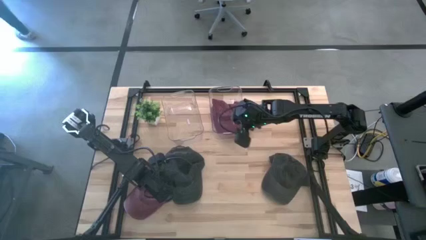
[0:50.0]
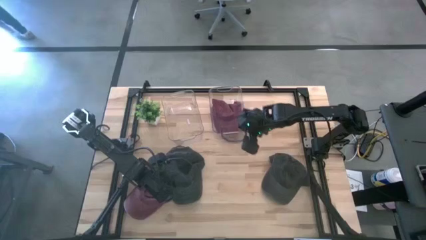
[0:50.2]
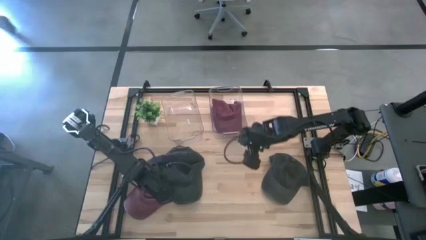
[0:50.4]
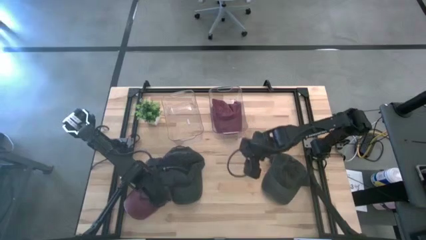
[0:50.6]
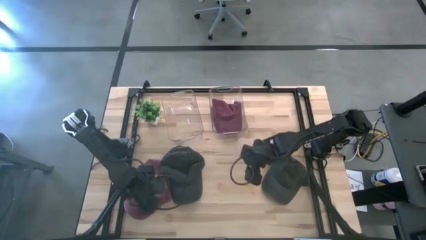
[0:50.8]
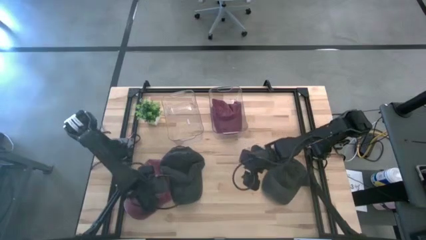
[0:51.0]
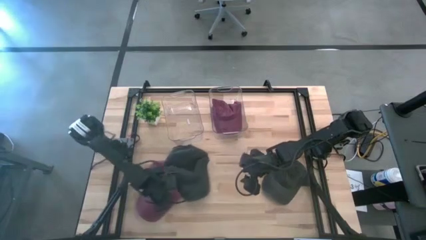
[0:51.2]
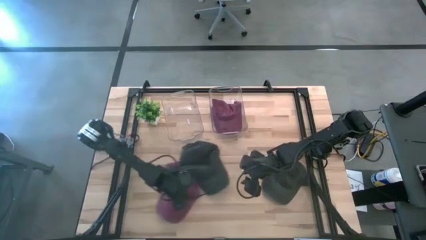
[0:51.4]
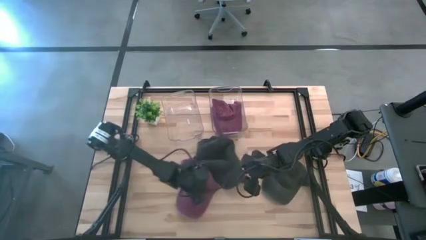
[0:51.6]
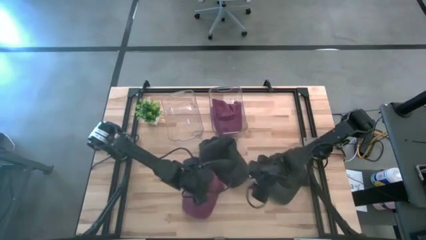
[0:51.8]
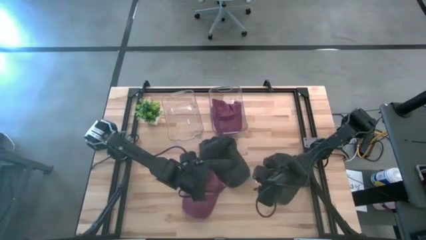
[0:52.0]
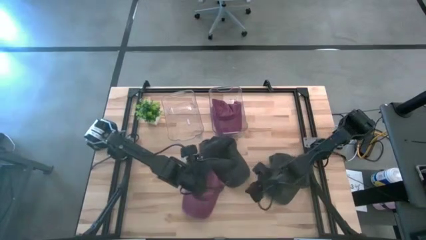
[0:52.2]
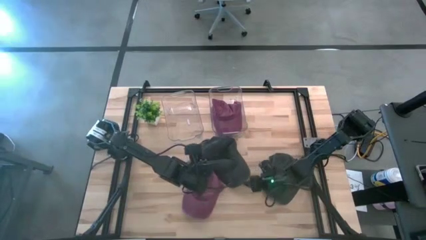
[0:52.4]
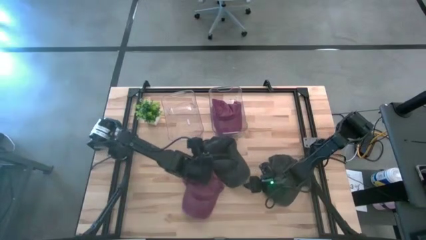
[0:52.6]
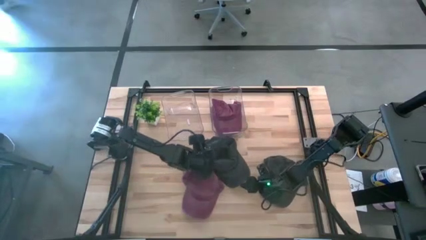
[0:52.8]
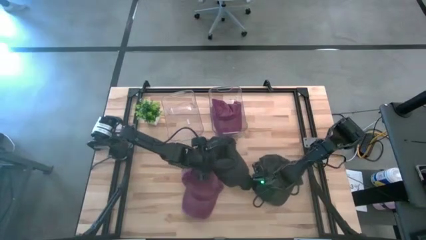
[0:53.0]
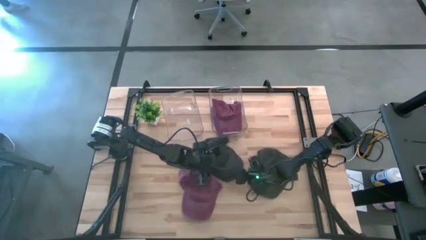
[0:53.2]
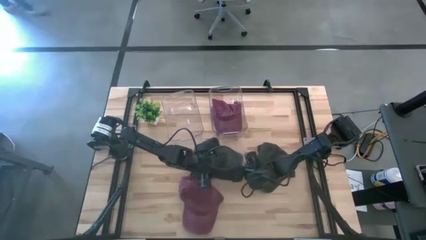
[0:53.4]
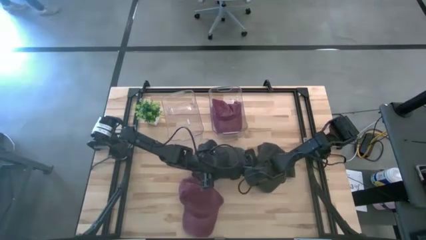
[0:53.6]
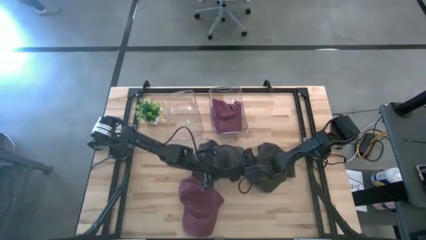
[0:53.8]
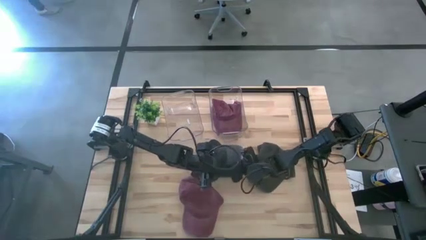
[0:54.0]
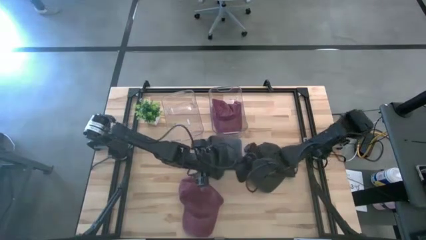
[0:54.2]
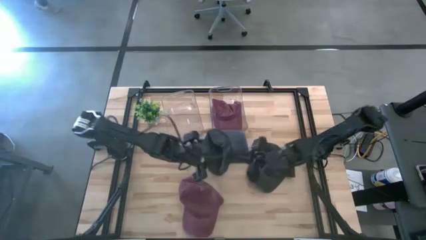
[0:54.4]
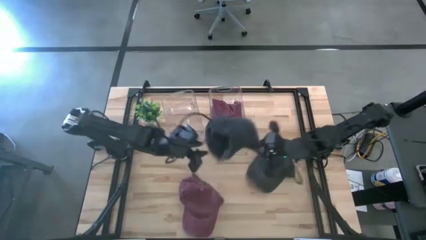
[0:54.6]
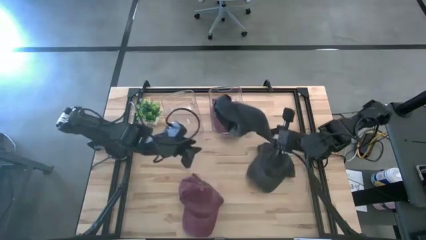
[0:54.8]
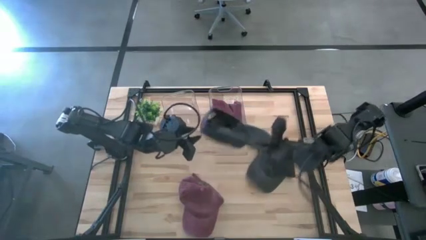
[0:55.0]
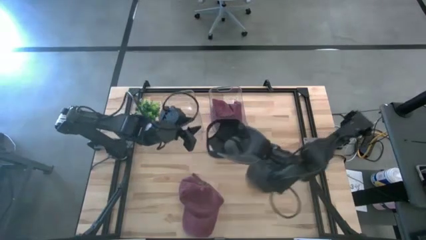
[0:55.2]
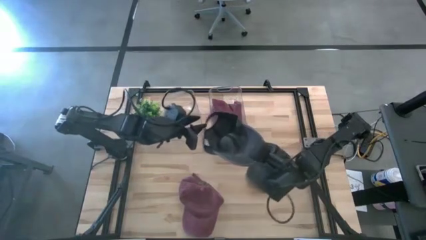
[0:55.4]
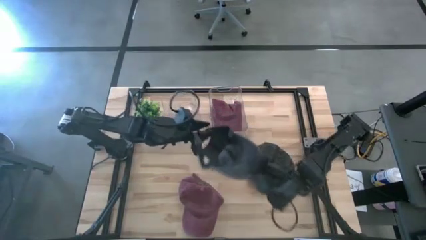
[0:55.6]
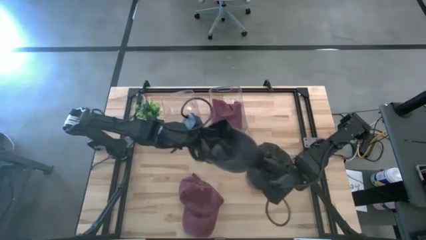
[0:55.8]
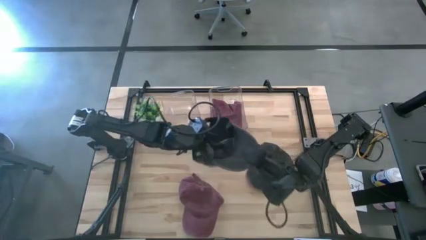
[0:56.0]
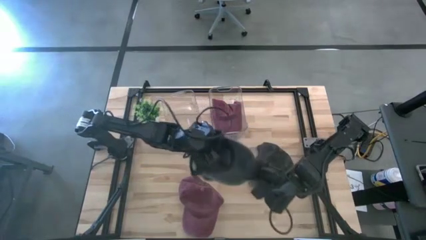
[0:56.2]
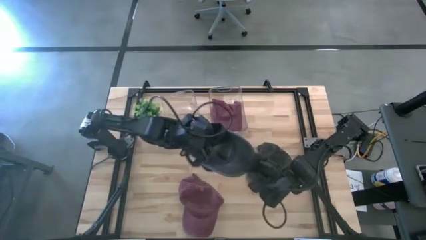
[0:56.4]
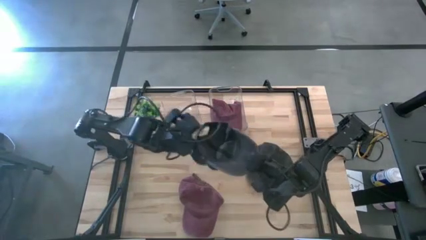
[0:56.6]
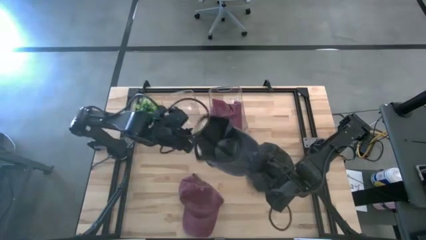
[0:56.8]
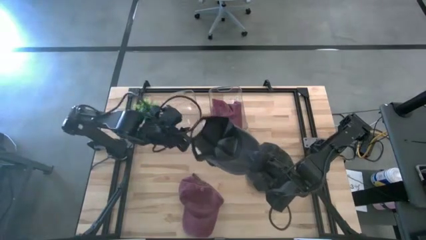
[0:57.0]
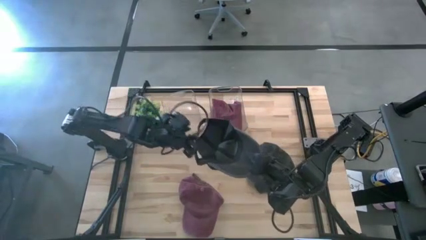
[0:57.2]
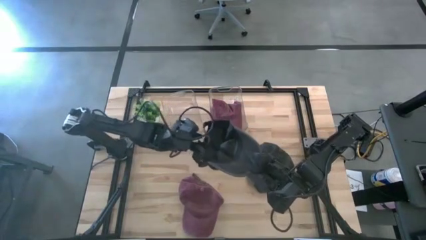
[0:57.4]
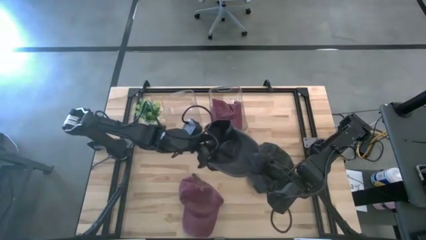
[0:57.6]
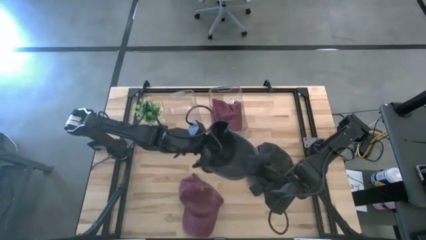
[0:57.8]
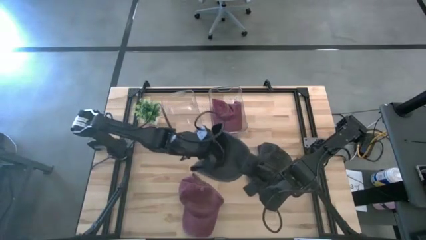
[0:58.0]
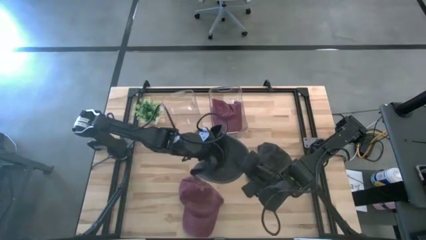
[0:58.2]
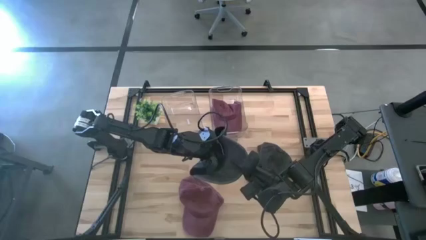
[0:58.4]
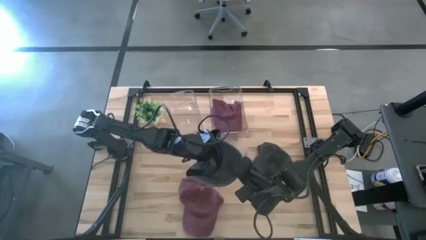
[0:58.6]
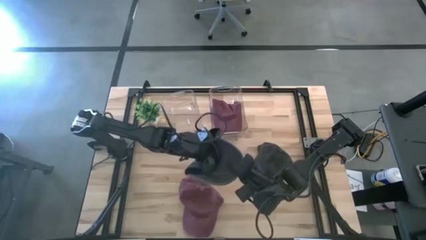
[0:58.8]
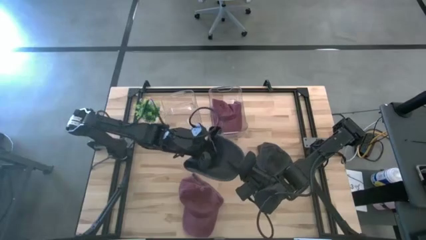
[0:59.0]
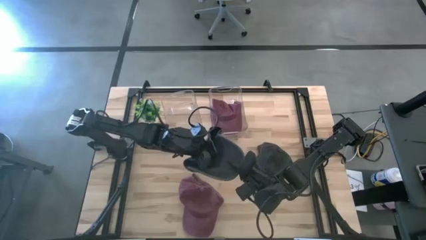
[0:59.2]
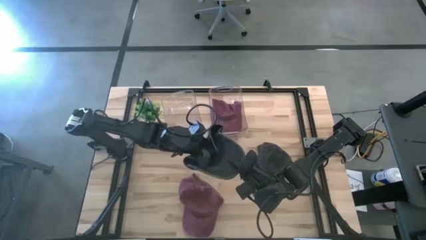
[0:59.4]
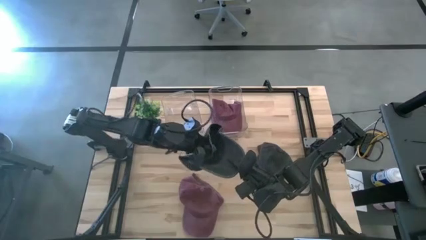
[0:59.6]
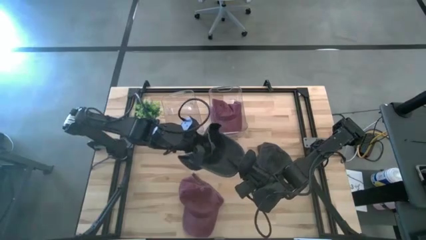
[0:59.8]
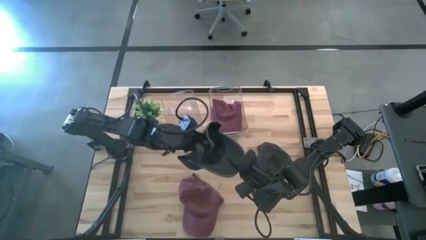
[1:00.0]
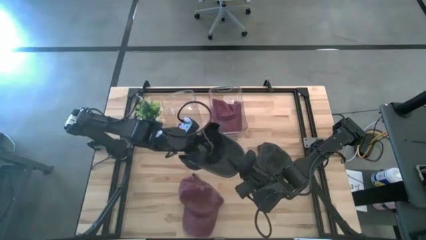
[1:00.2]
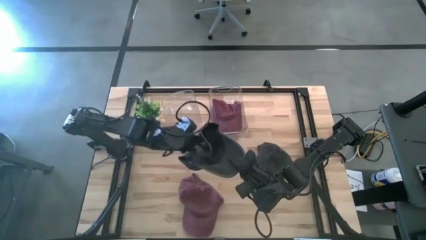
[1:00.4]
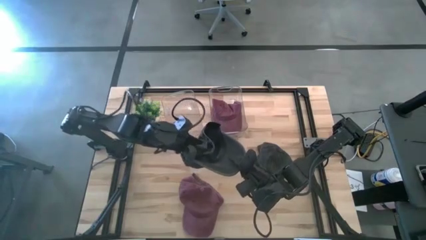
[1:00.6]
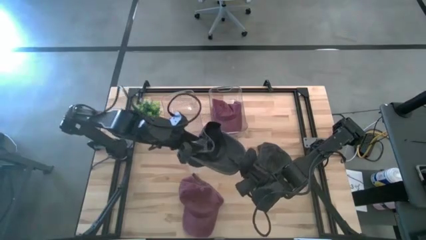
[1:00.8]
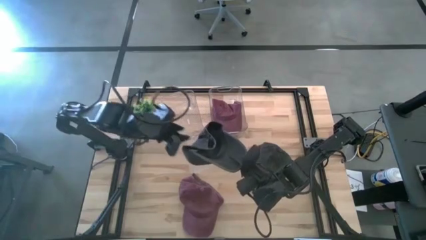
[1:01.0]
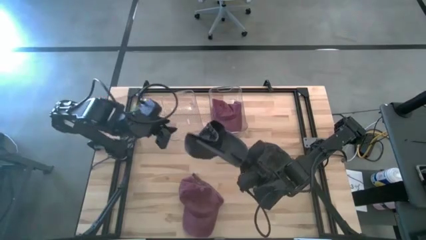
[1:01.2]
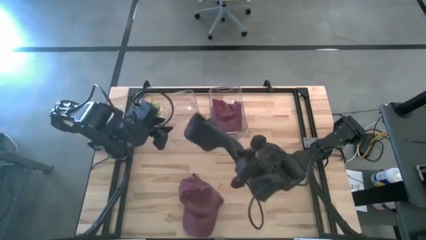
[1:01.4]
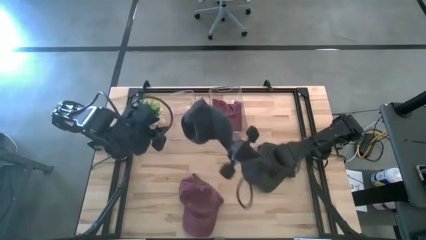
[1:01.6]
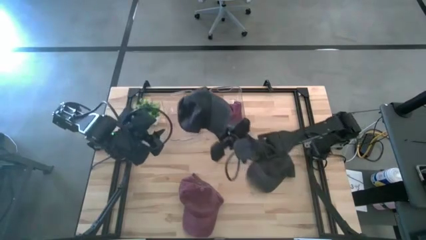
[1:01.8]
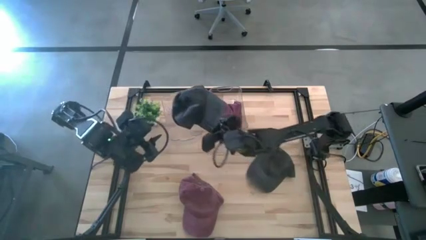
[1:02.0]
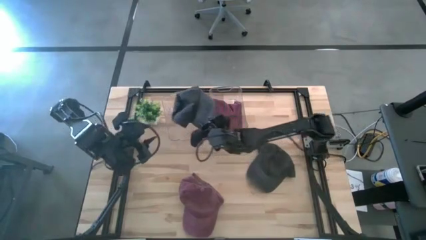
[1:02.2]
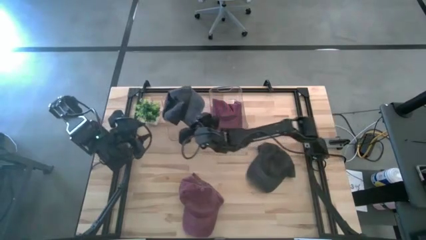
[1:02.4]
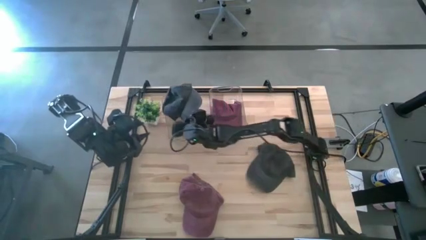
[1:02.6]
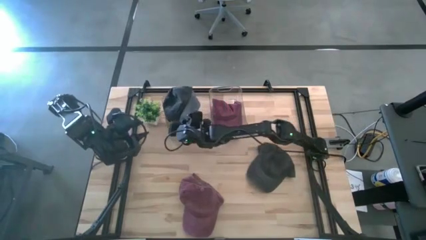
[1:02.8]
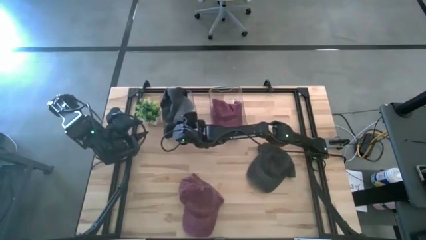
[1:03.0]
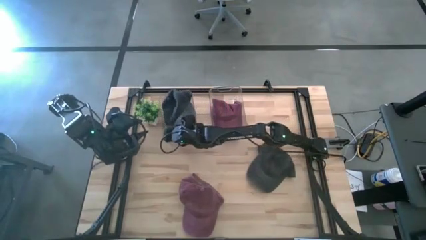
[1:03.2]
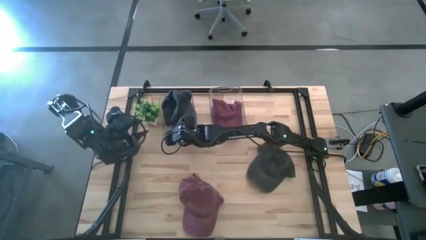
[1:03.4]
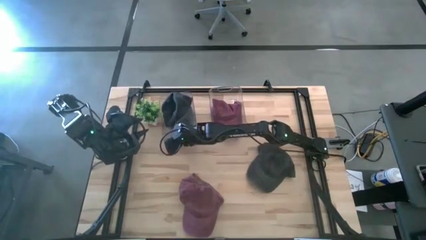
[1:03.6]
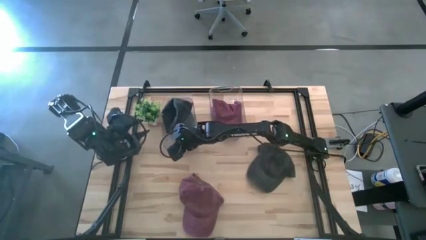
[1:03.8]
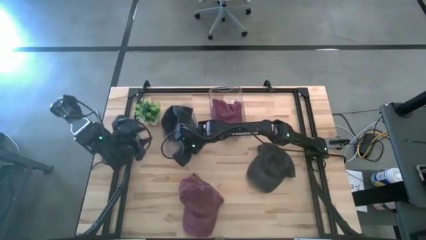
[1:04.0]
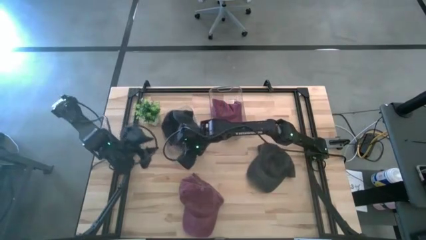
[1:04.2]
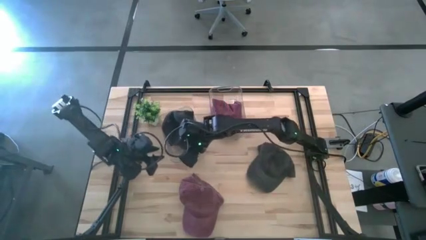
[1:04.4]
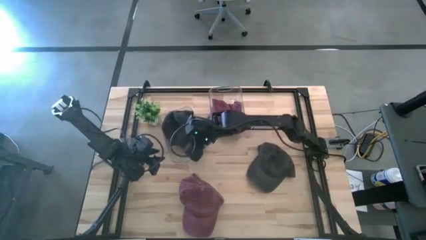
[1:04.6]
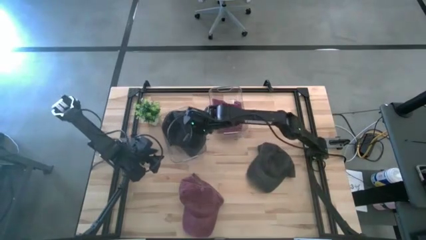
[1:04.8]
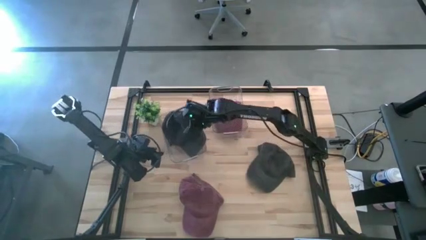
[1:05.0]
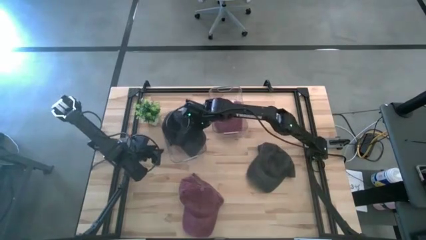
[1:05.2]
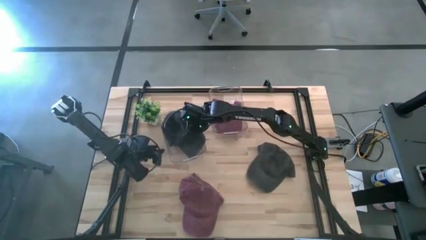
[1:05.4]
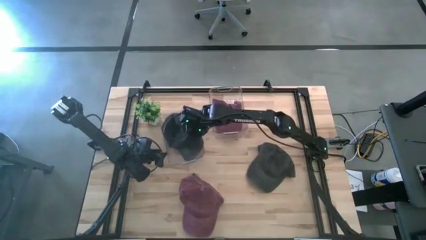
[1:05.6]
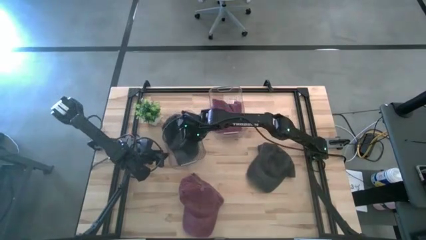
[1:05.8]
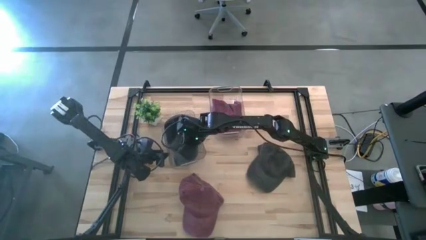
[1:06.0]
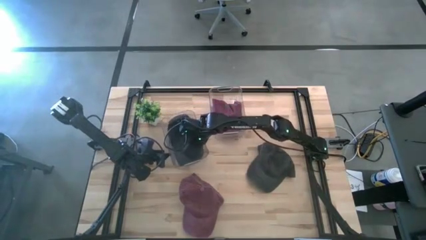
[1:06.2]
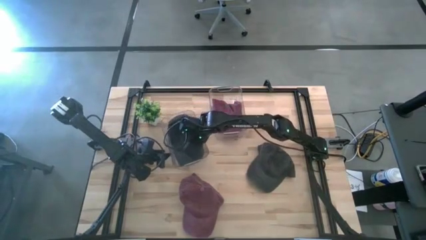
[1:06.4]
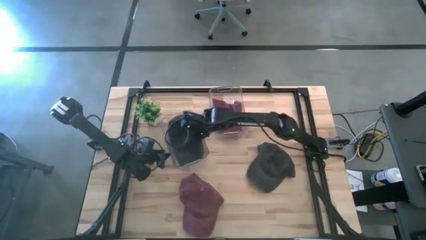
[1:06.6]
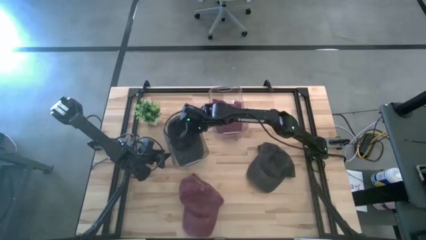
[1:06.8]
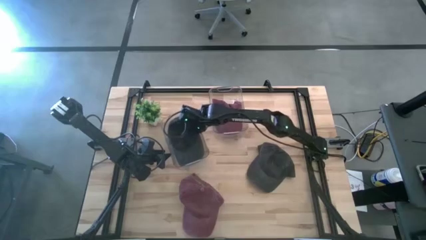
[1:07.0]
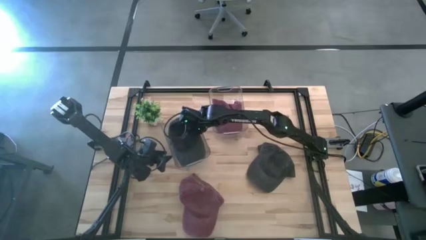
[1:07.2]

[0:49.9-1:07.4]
Task: Pick & Place hat
Put the left black cap into the left transparent bin
